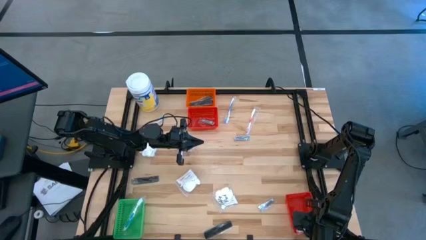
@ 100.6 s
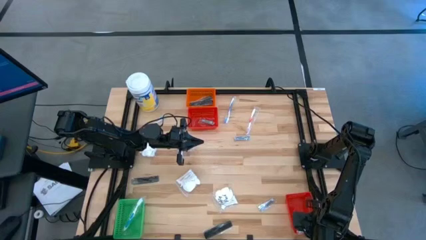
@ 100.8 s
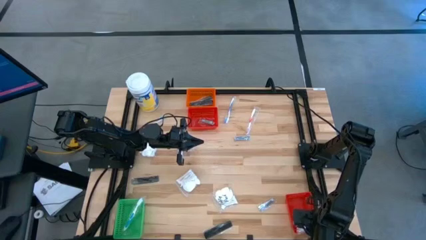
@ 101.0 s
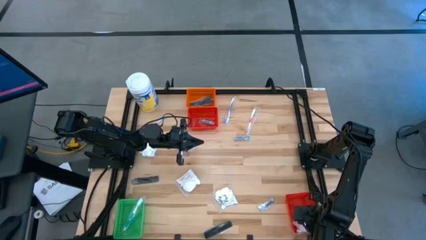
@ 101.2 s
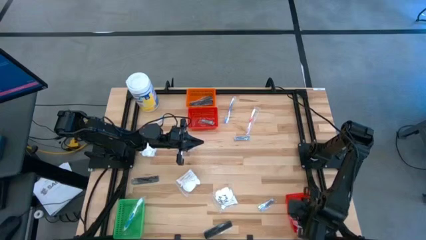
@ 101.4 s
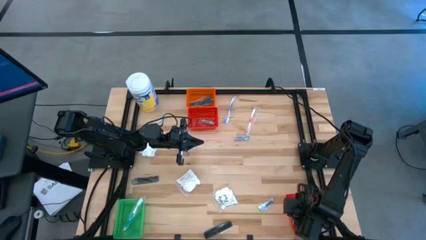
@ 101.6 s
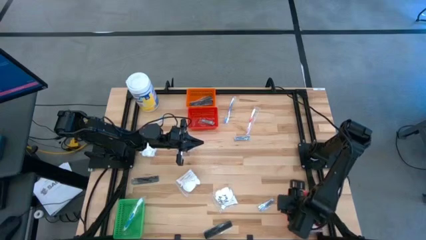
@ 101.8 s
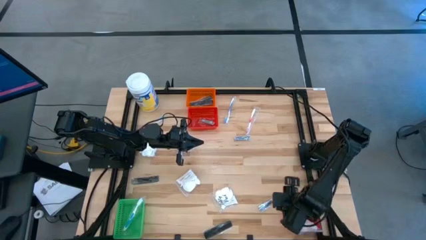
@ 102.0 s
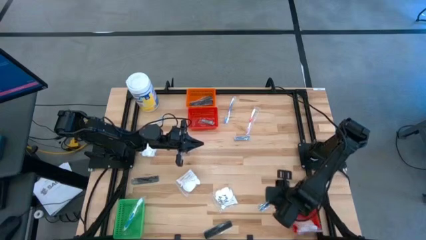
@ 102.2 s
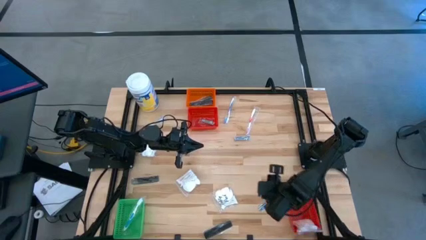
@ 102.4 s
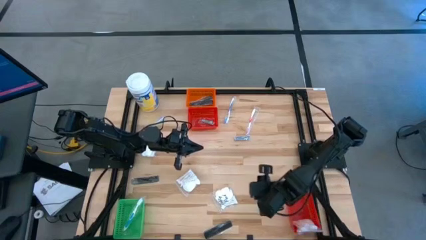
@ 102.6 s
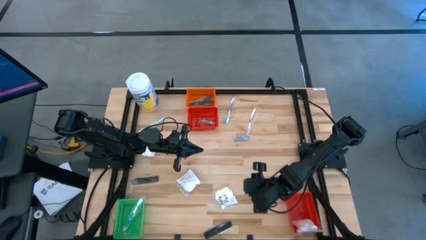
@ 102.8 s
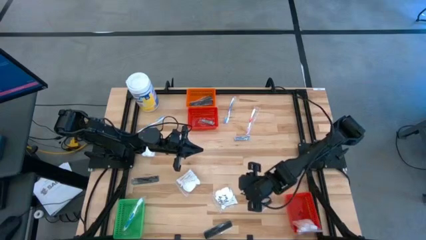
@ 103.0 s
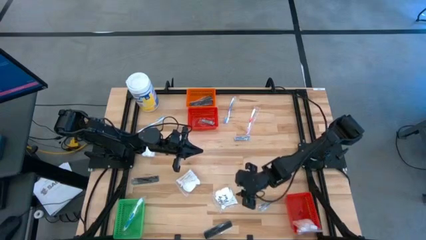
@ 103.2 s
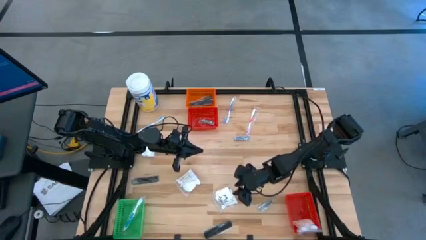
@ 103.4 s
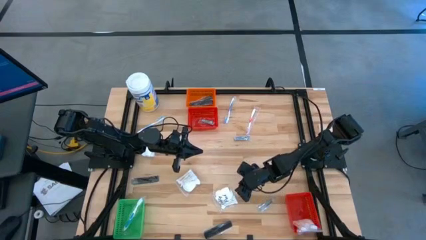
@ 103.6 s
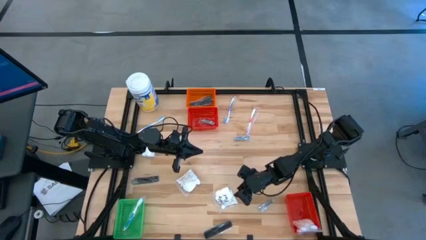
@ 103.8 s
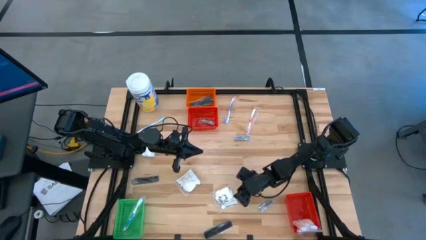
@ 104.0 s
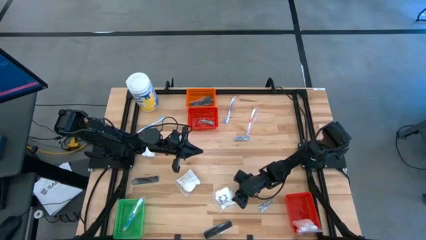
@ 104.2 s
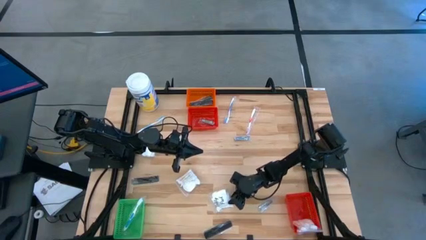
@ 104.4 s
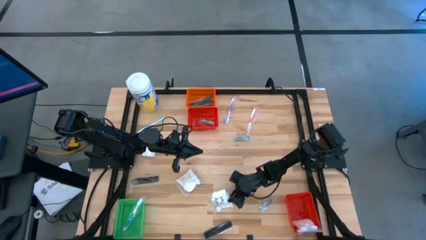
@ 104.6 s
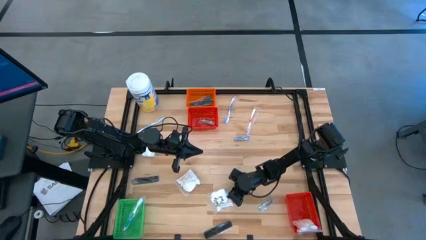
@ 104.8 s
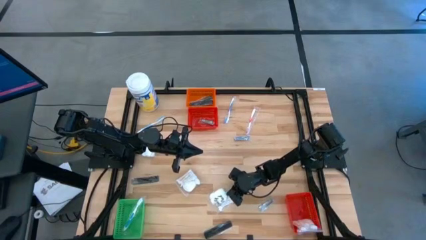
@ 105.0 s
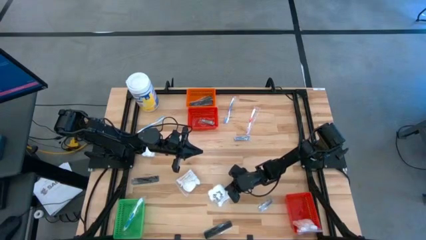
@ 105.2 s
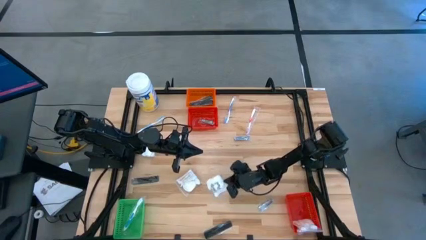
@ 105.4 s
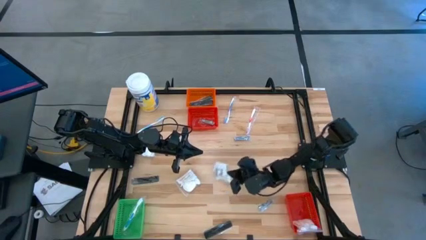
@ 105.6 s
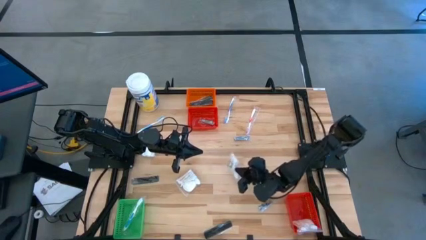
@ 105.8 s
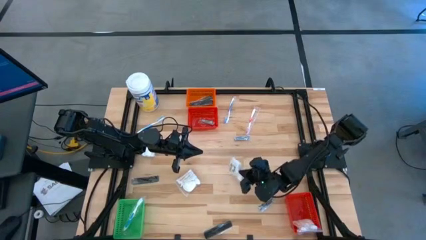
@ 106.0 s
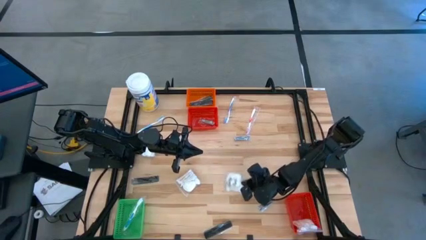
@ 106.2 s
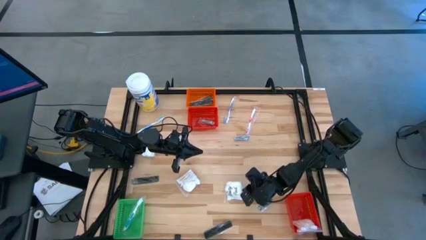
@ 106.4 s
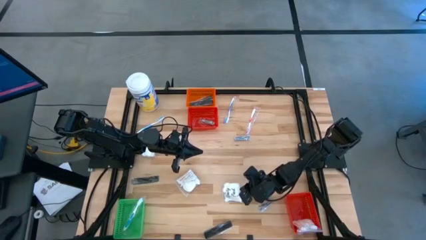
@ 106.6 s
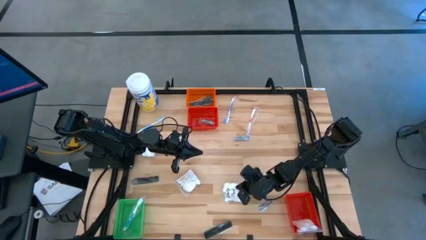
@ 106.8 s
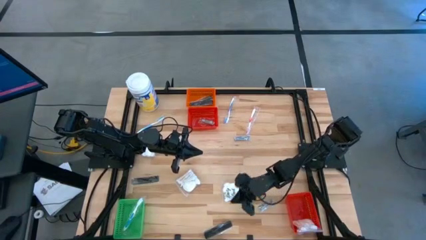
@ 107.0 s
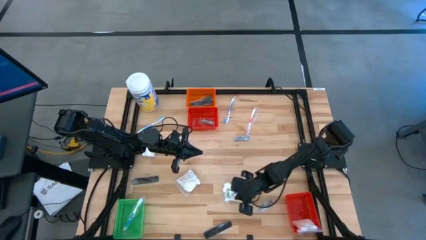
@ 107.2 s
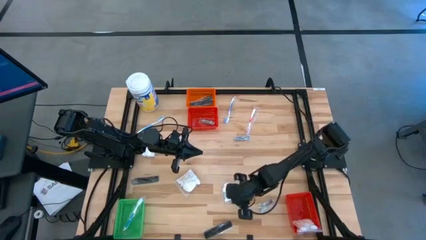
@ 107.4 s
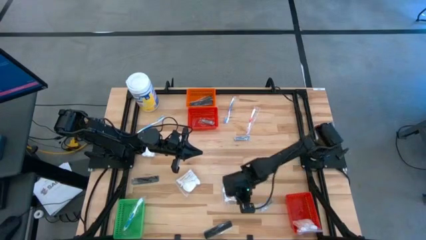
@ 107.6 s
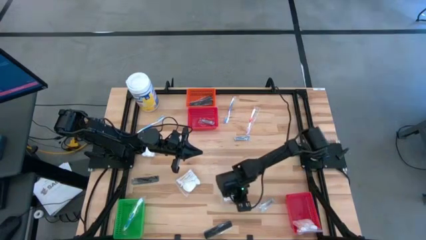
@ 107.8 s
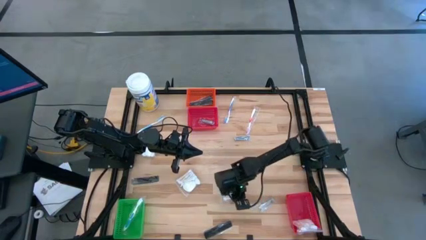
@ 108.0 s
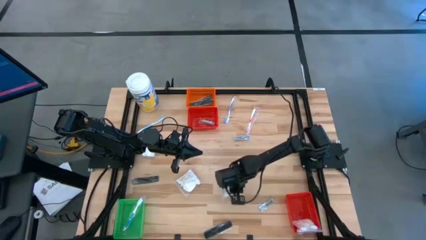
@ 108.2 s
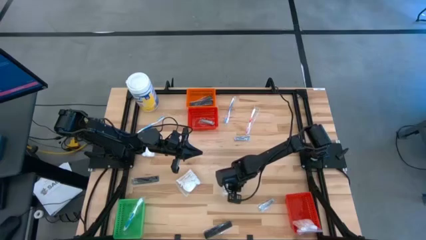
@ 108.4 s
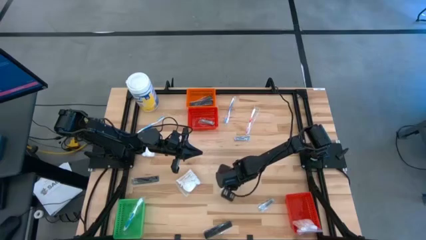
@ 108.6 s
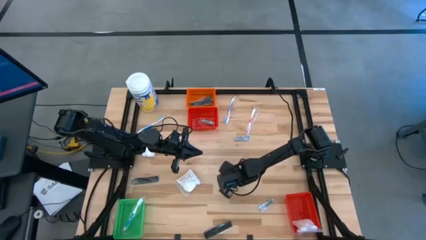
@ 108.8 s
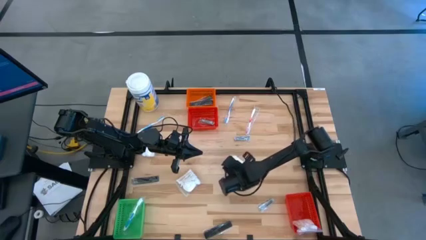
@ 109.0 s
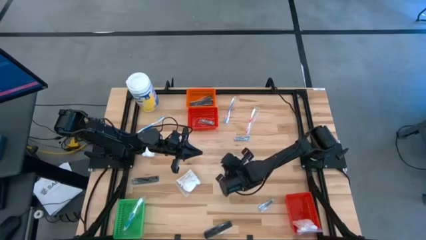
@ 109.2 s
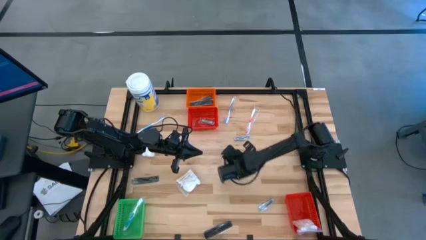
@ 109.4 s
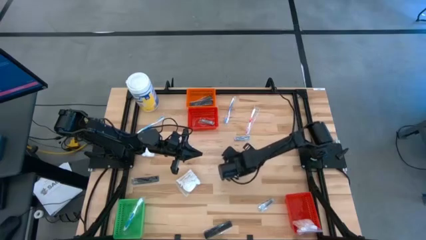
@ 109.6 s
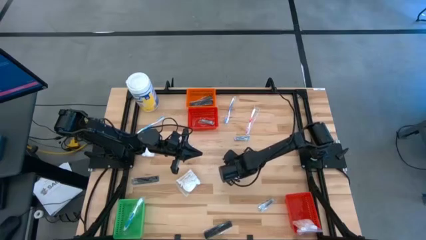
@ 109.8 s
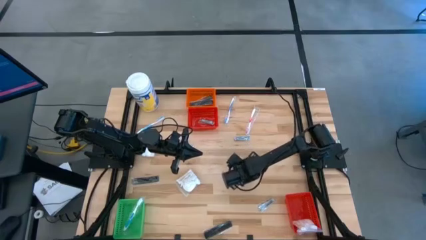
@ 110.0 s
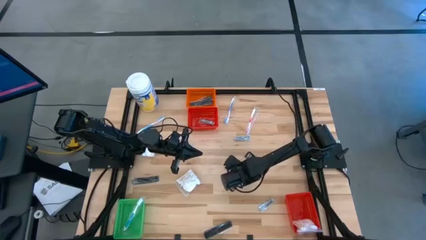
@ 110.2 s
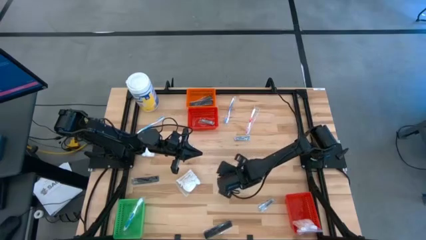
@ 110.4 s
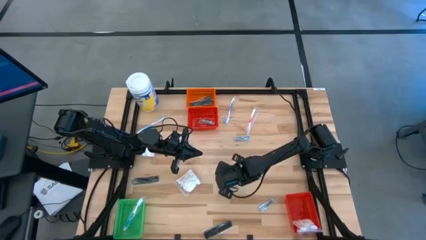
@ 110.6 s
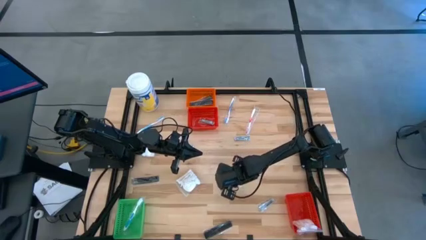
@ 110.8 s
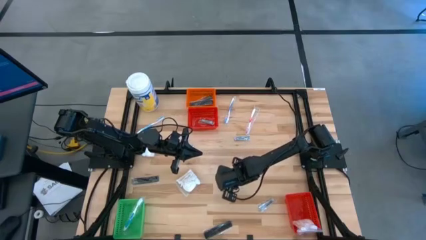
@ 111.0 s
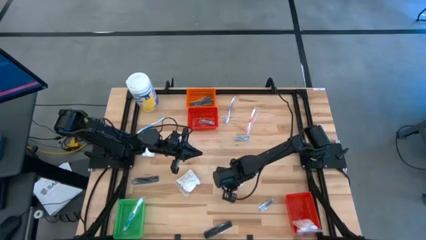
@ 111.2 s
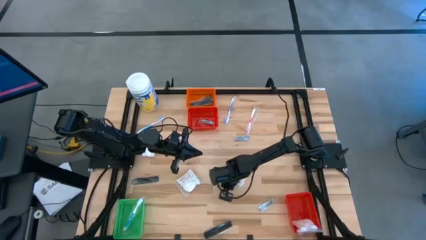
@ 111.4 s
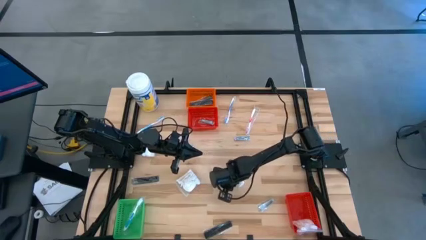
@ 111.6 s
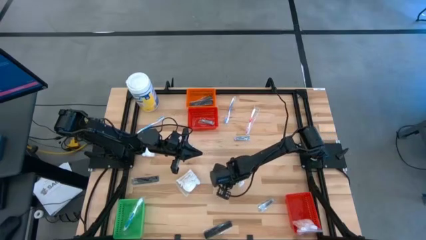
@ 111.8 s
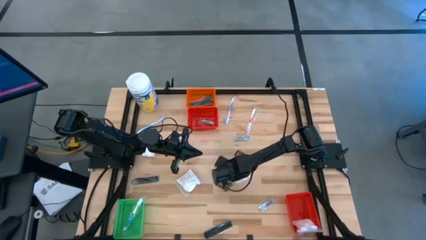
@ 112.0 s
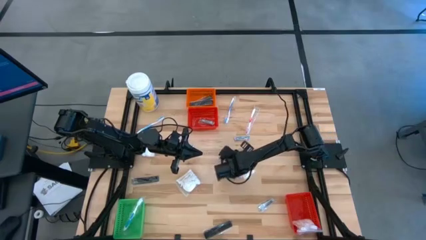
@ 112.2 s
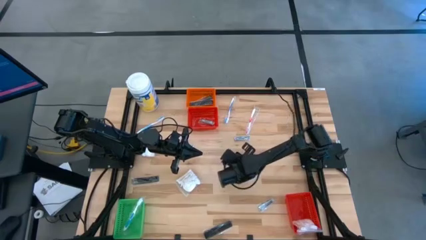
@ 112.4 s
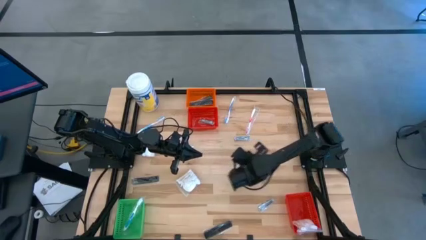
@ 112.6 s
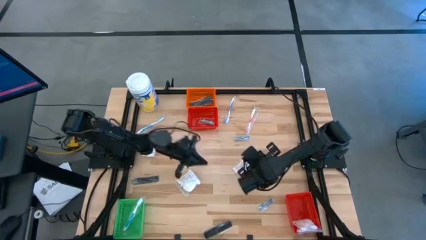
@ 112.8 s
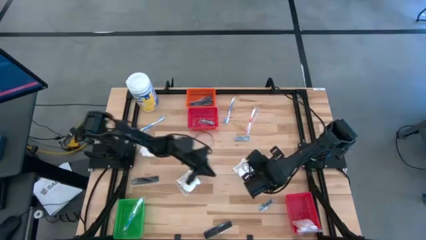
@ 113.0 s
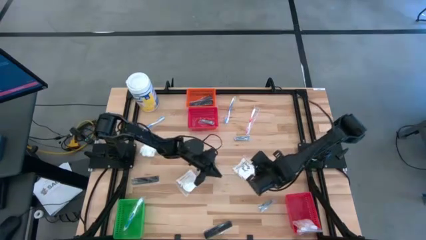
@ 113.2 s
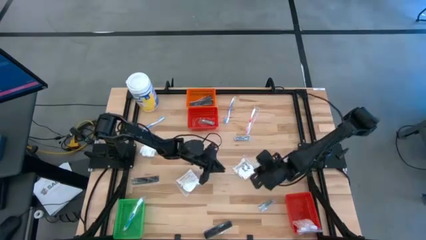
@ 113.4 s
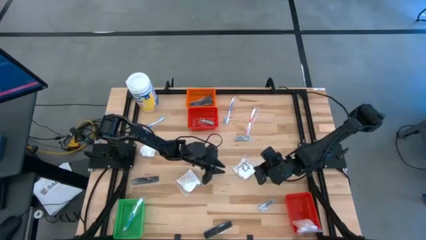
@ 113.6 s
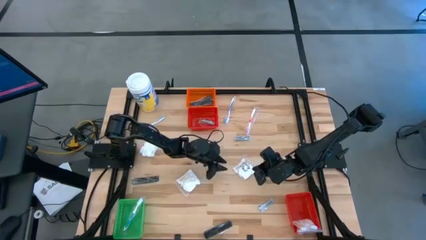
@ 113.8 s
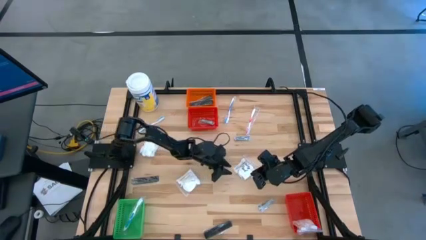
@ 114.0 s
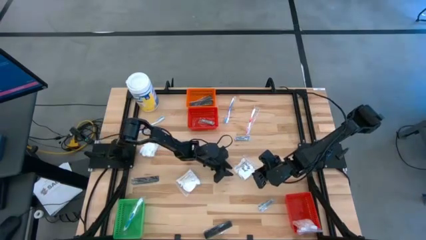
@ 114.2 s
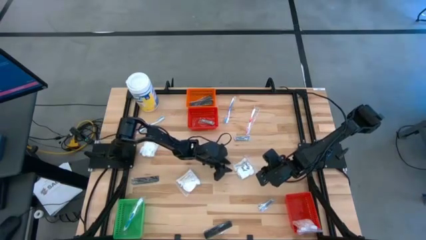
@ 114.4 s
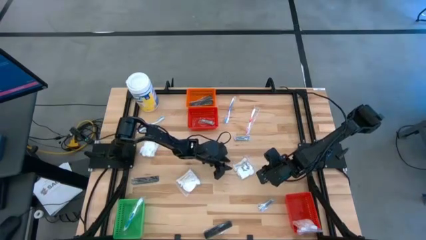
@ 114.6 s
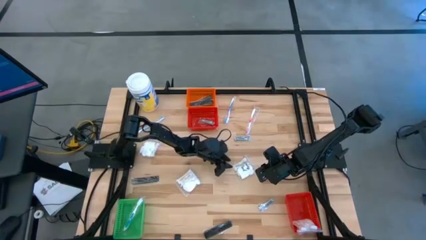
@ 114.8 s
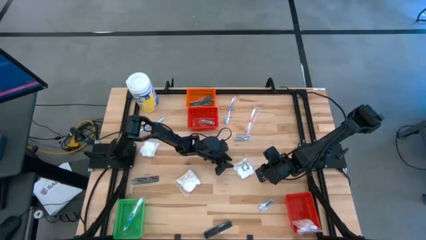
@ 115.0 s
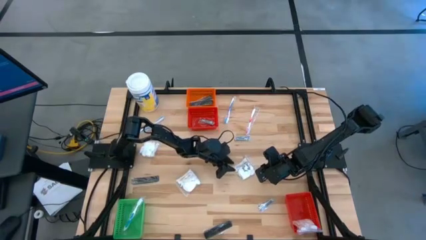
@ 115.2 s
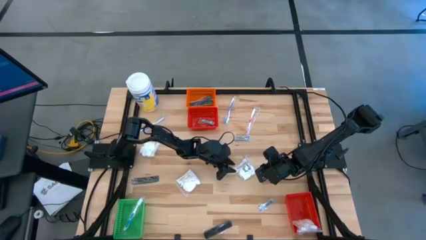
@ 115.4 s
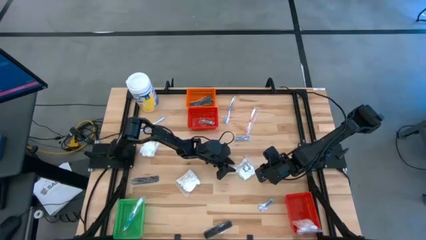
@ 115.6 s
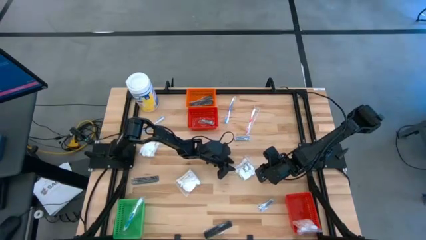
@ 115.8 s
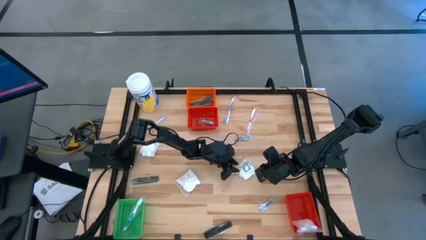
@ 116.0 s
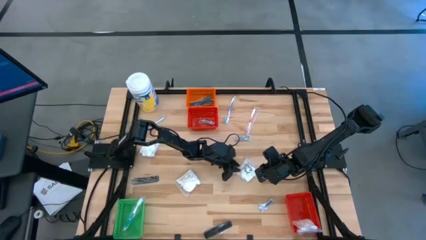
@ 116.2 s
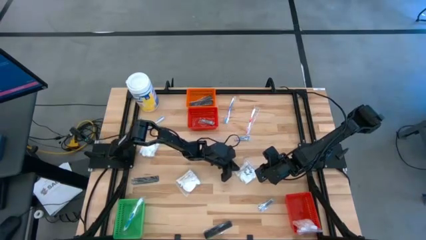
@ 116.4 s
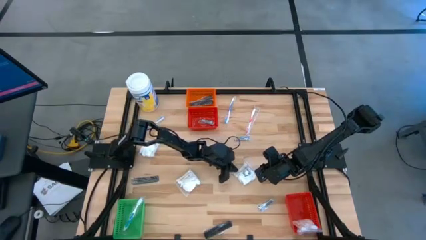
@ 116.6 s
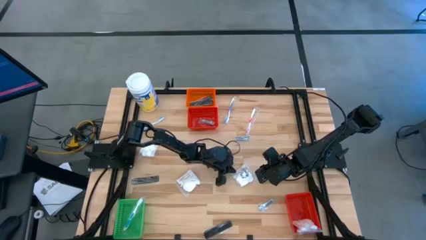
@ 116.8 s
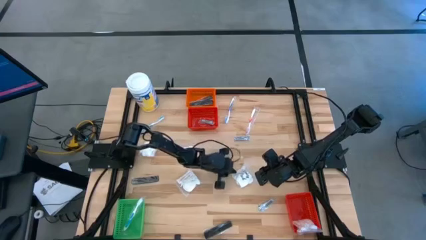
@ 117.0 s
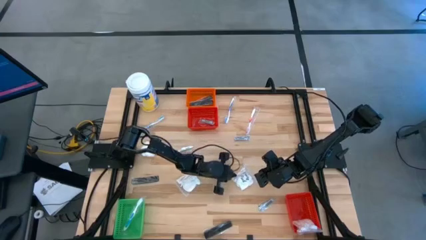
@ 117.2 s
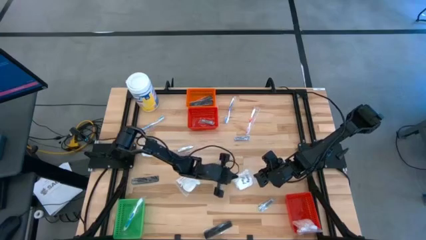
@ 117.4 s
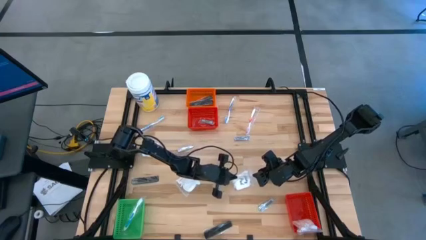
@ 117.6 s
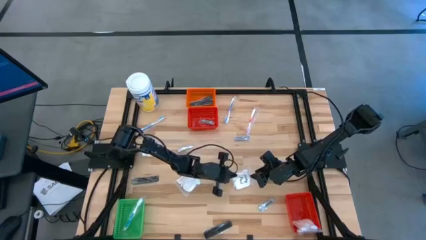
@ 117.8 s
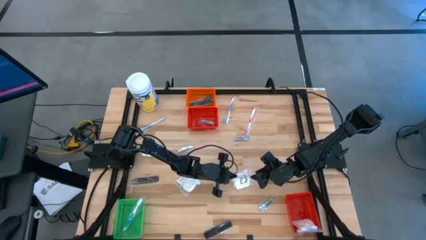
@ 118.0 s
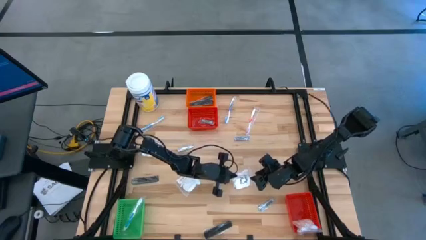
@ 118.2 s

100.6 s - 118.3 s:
Task: Pick & Place Travel size toiletries
Put the cotton pack into the bottom red basket
